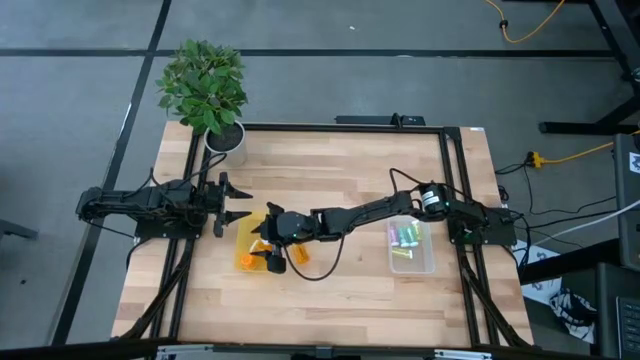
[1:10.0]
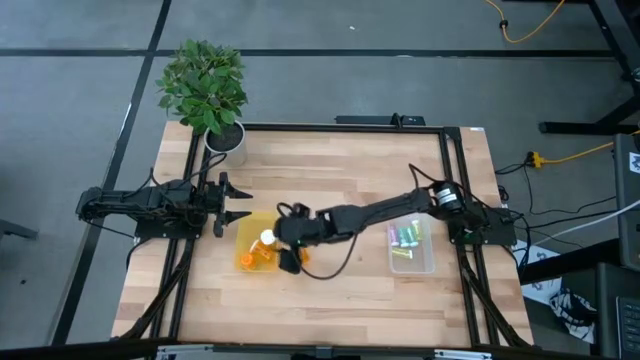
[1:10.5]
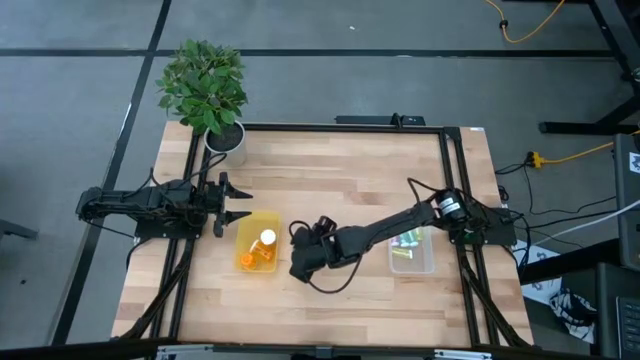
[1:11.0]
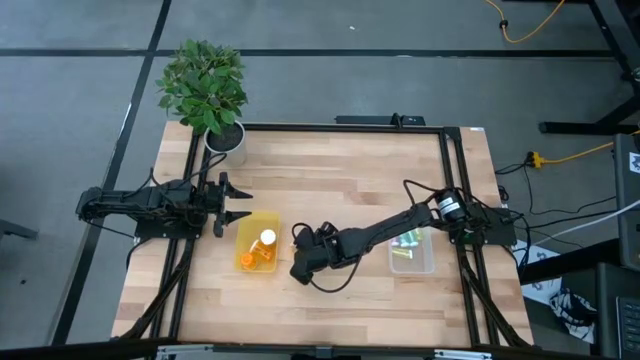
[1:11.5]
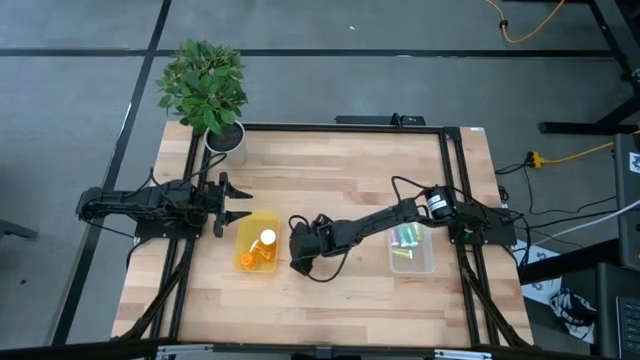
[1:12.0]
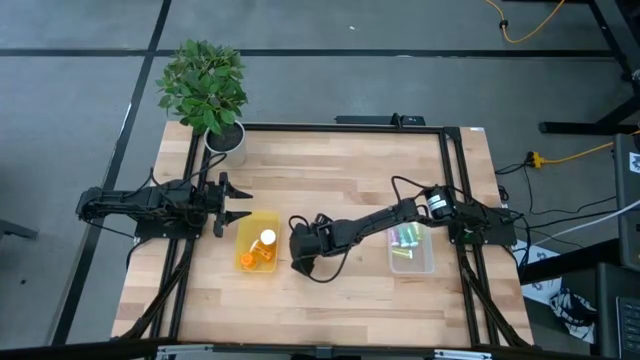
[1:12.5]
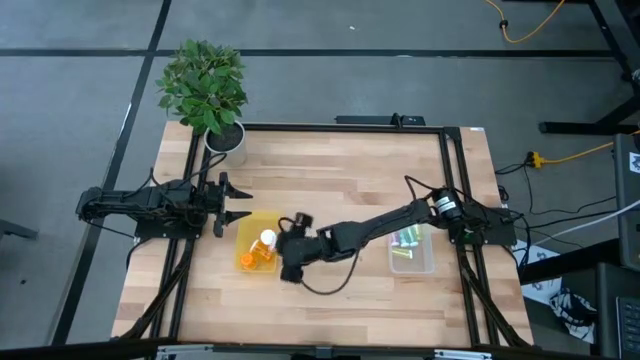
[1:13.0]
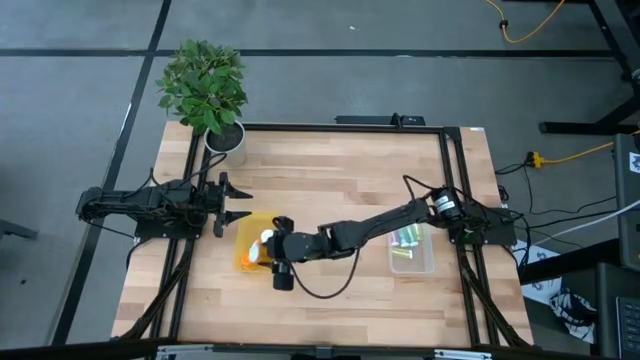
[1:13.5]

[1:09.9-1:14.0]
Task: Pick and place medicine bottles into bin by pill shape (circle, oval)
Put the orange pill bottle into the yellow bin

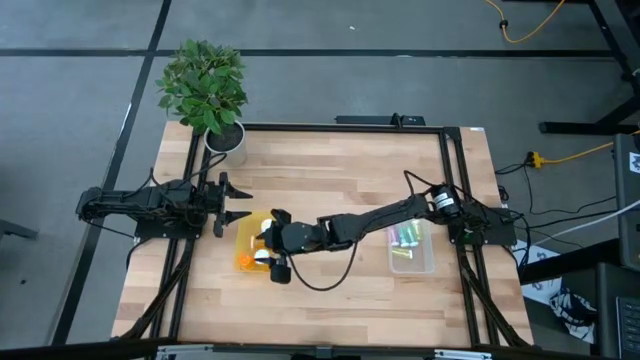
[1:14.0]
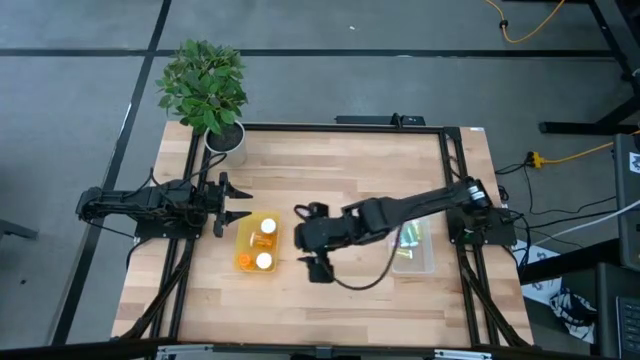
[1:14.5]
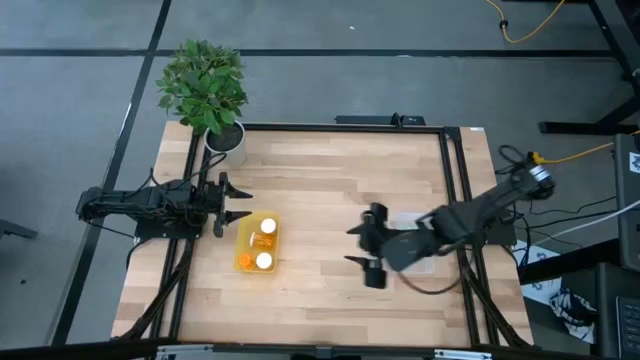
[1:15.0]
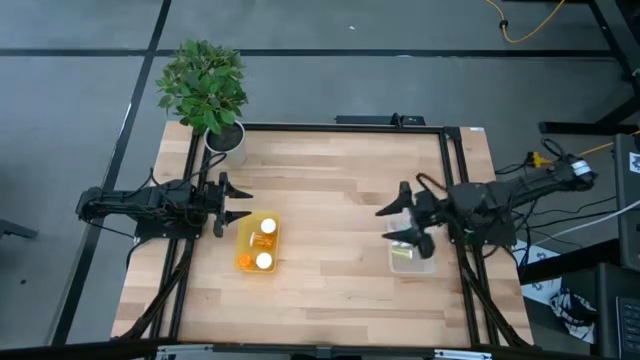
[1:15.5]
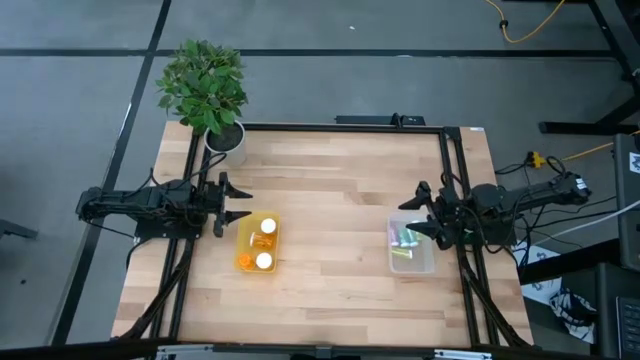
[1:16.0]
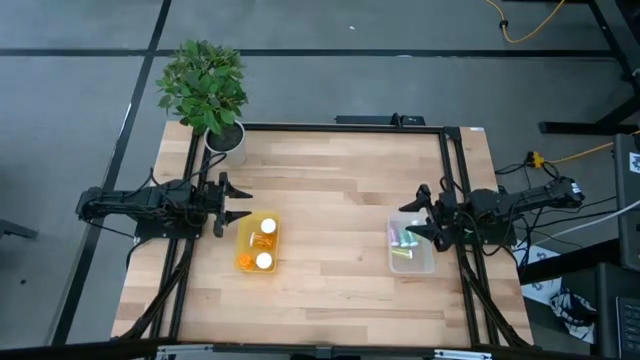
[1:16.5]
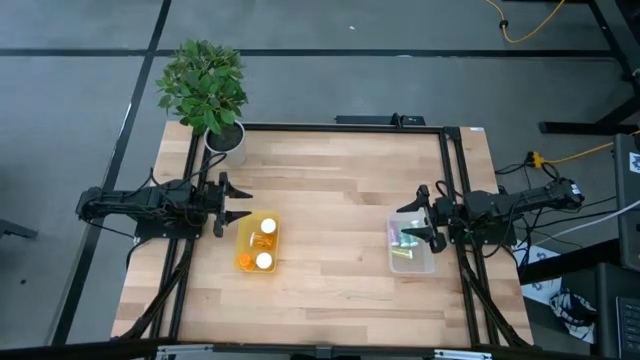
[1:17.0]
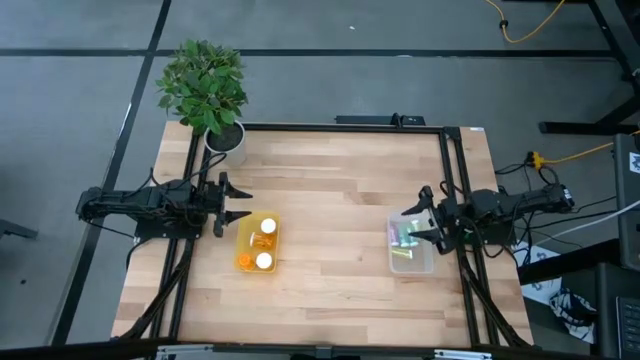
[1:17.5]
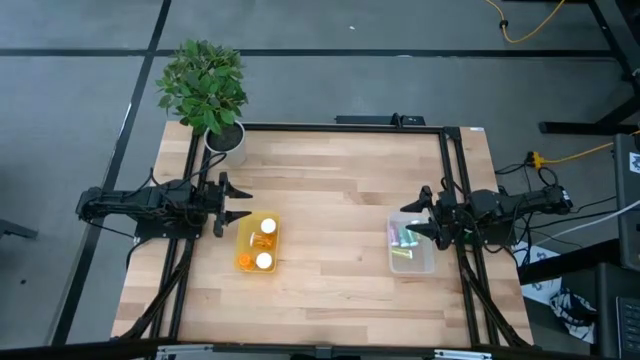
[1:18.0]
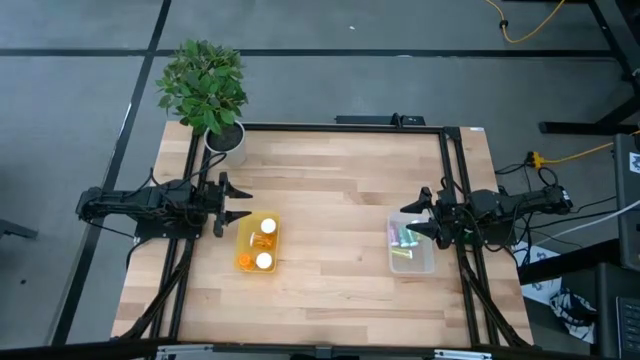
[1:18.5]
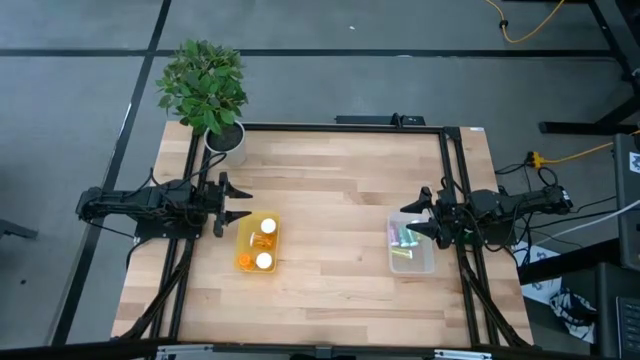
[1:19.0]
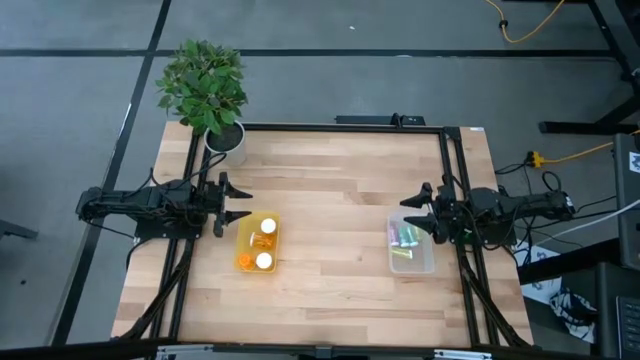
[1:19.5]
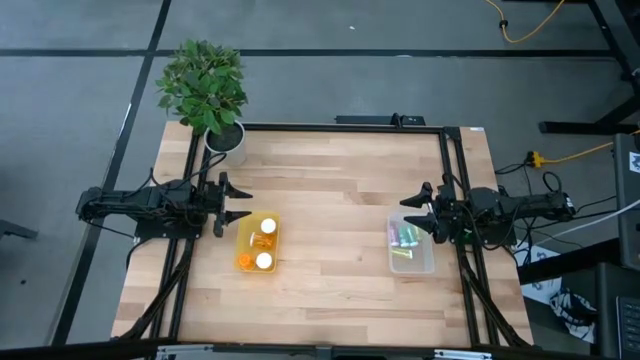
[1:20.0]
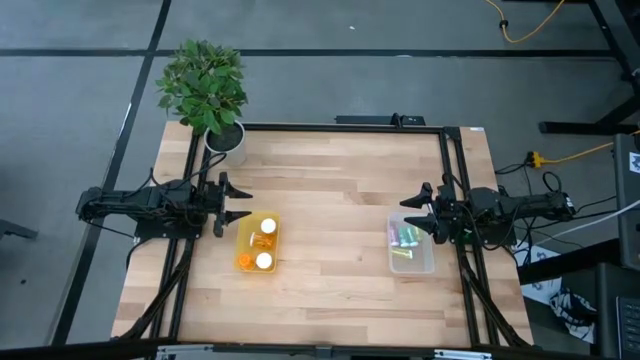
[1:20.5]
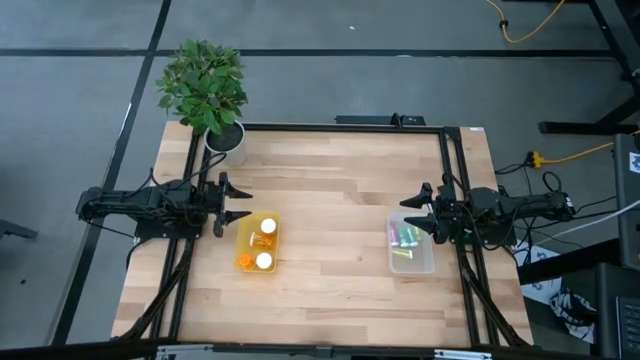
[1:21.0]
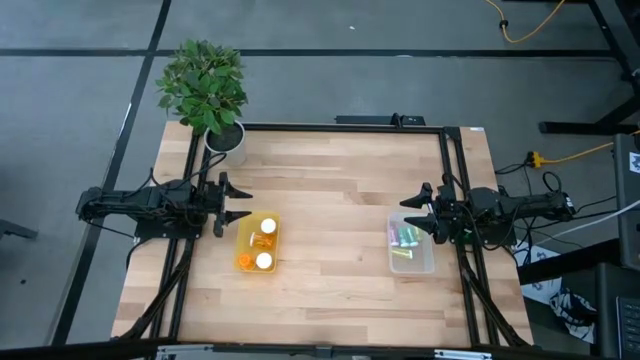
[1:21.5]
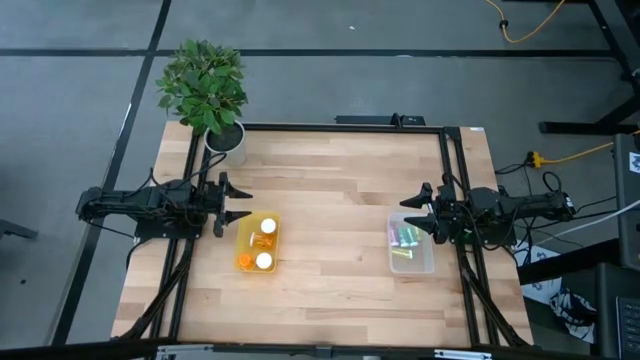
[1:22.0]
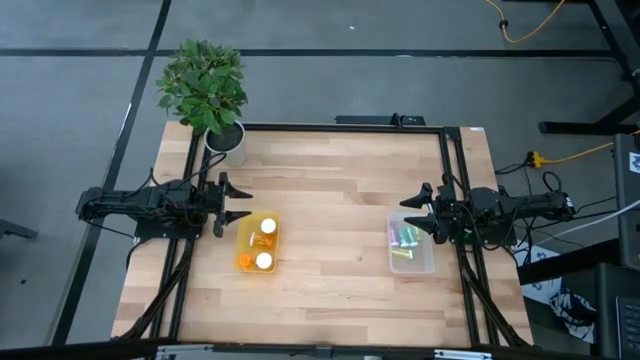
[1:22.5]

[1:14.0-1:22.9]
Return to Home Position

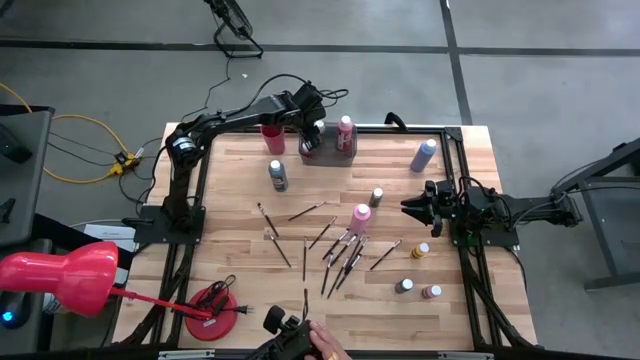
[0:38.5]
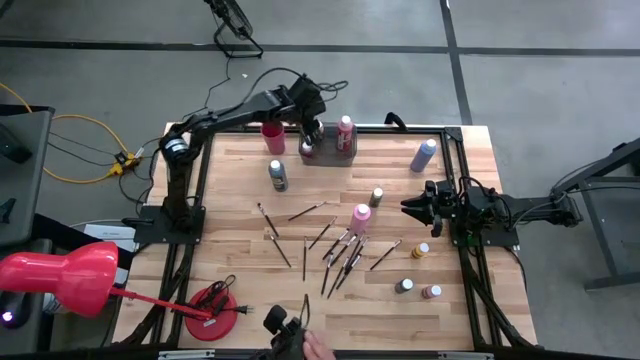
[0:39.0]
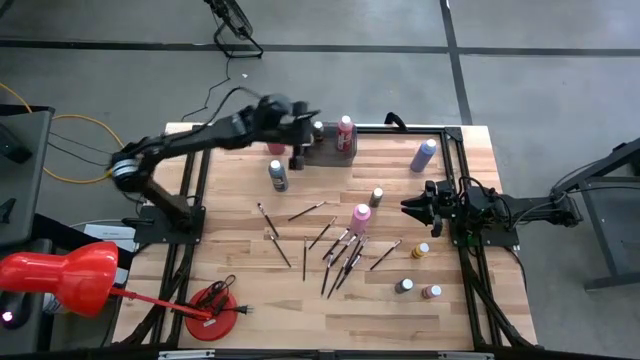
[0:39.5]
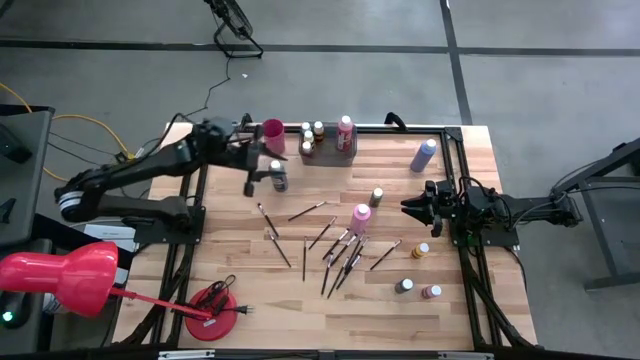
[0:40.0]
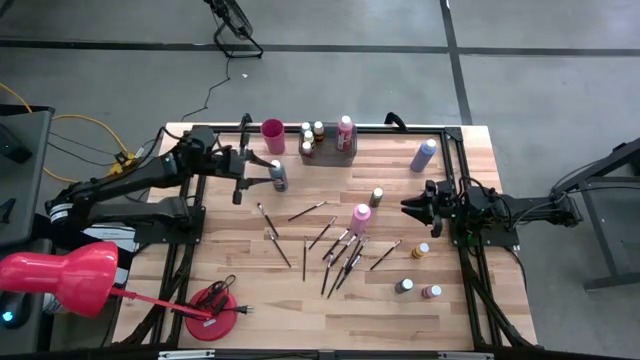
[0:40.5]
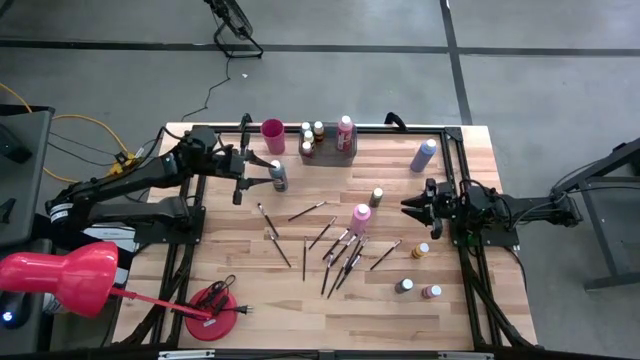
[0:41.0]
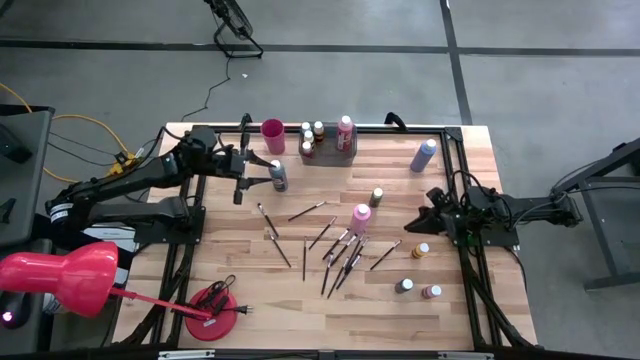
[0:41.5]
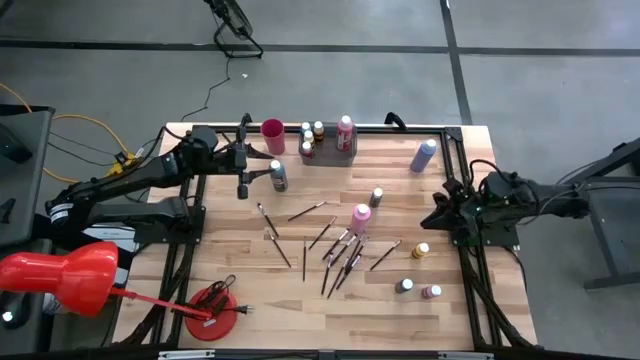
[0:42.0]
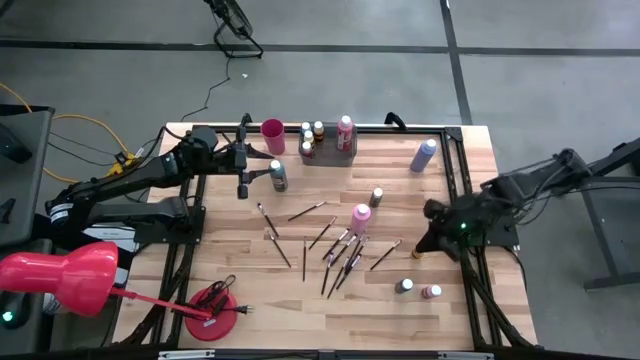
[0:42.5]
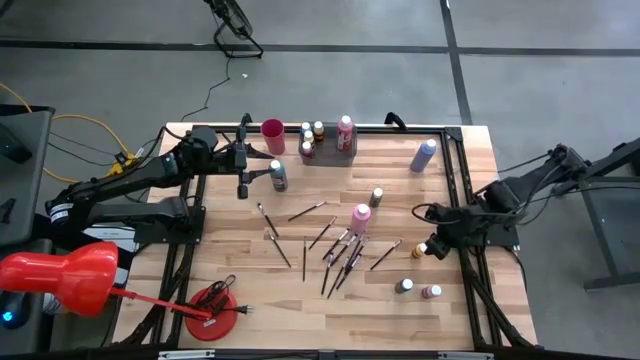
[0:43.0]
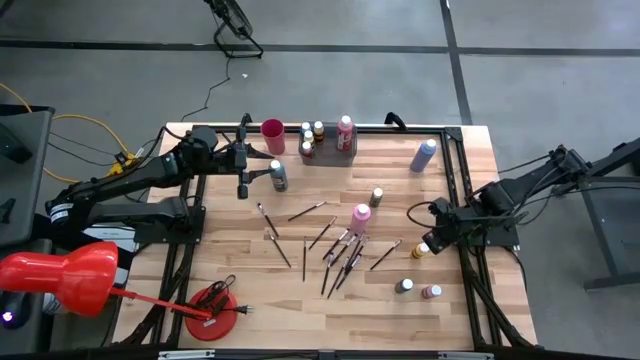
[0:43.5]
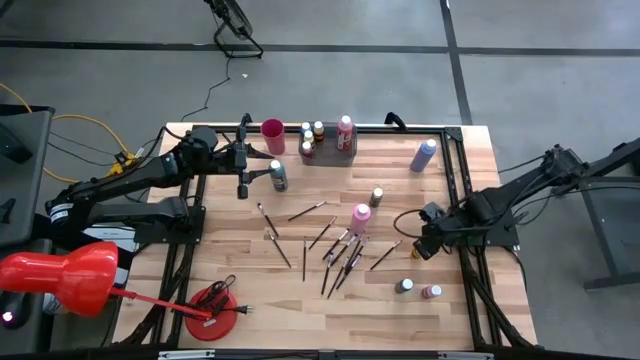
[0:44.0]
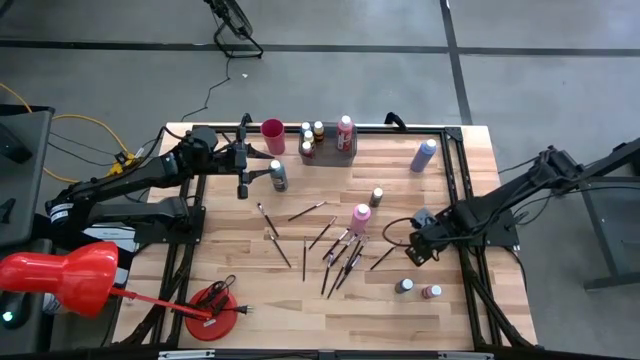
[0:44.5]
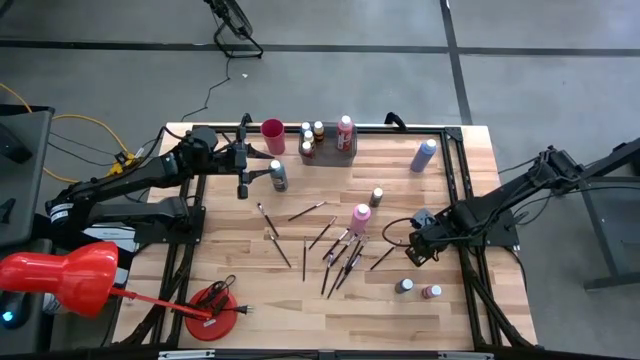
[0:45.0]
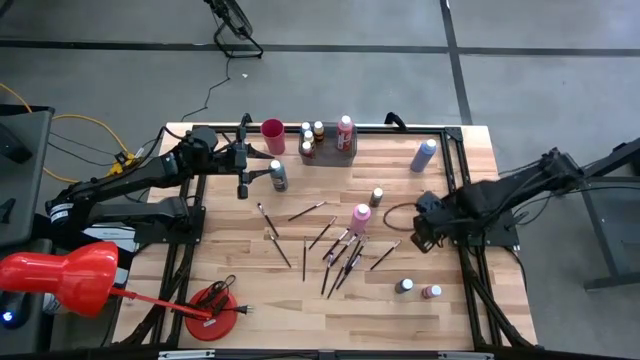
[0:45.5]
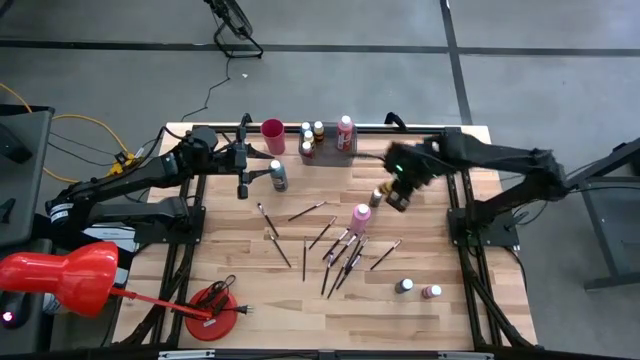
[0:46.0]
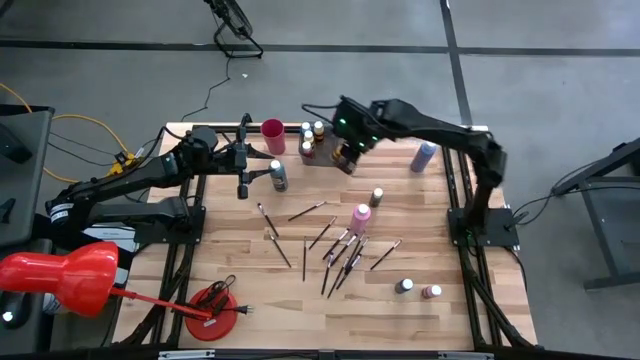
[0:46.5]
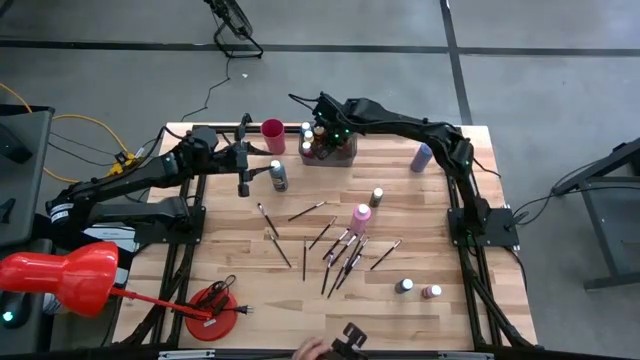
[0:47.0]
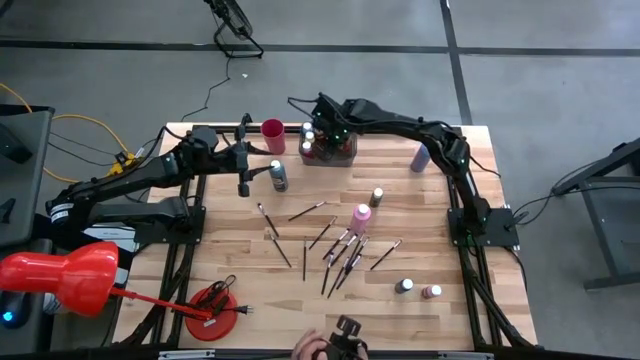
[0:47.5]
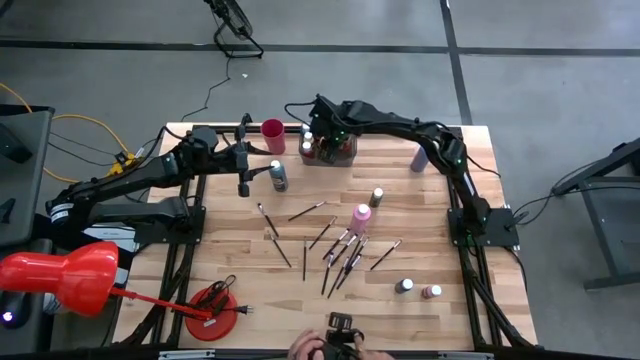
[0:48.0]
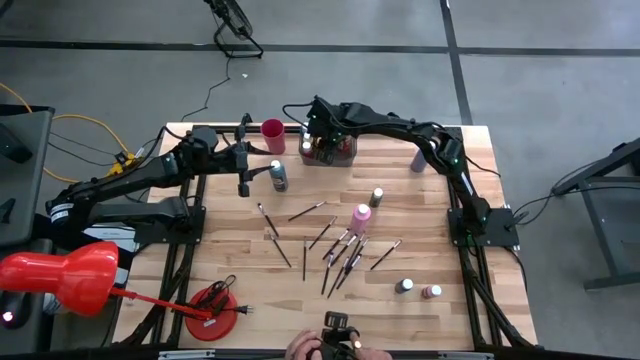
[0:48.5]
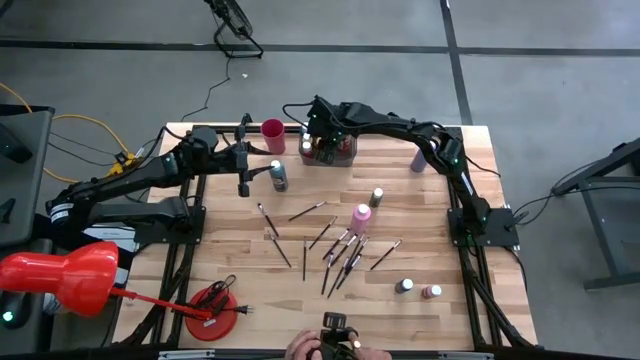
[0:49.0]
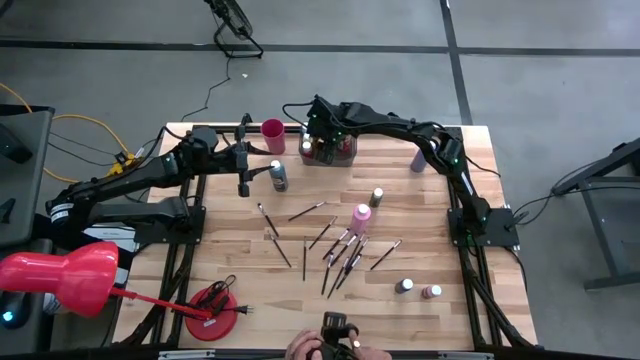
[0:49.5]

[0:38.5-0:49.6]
Task: Pick & Place Paint Supplies
Put the small yellow paint bottle into the black bin
